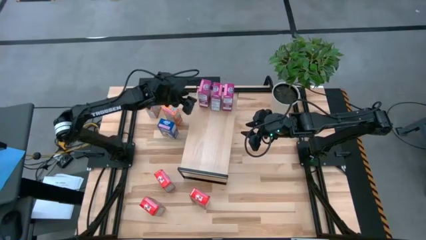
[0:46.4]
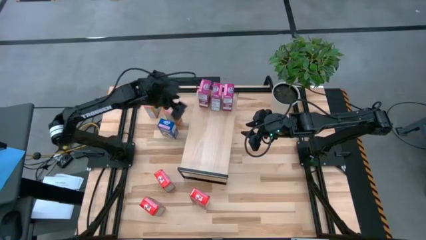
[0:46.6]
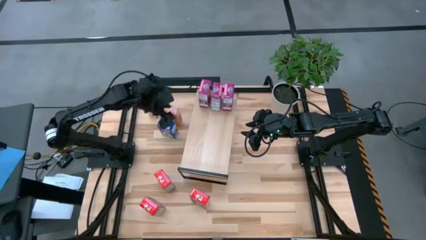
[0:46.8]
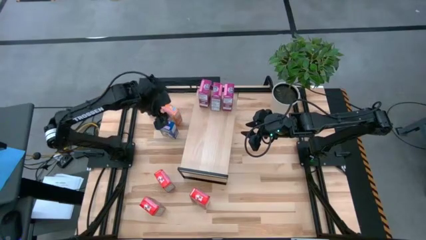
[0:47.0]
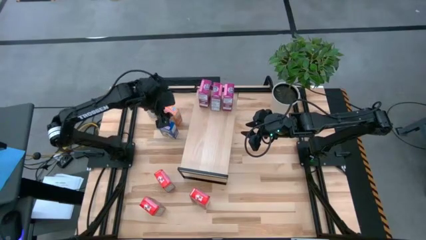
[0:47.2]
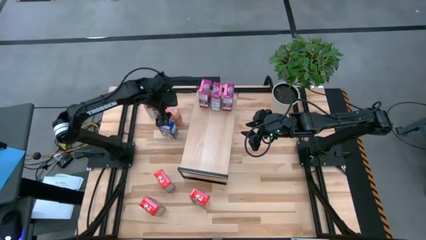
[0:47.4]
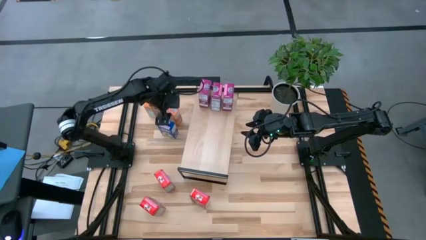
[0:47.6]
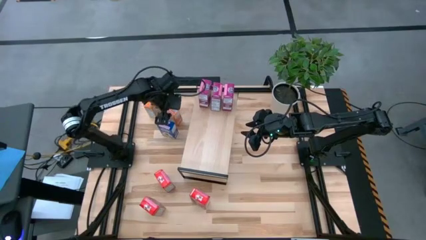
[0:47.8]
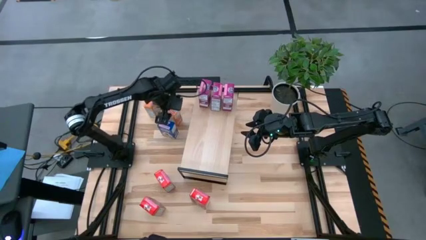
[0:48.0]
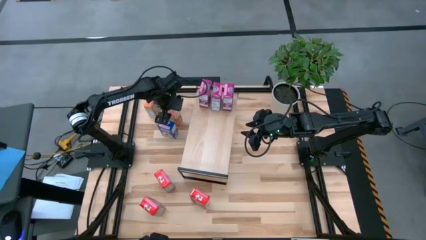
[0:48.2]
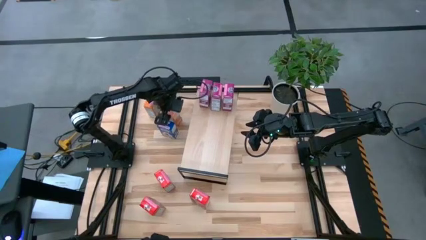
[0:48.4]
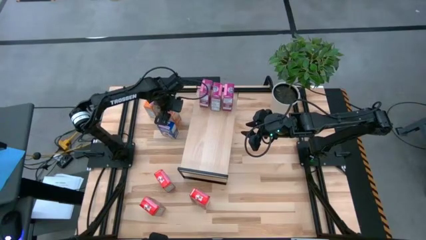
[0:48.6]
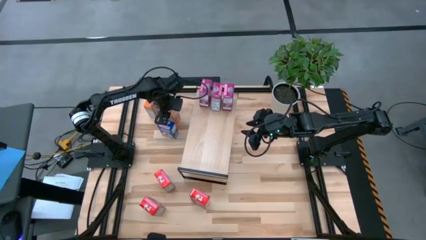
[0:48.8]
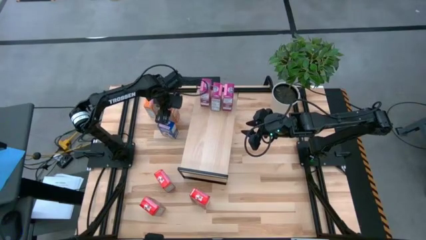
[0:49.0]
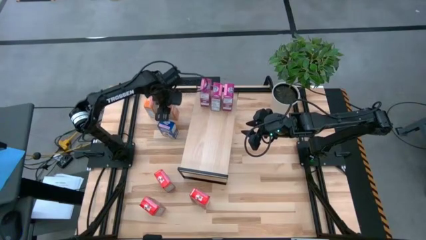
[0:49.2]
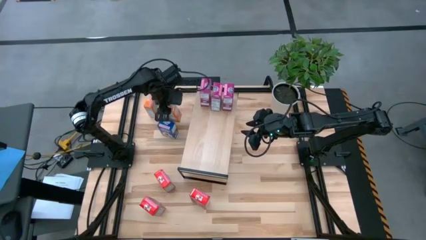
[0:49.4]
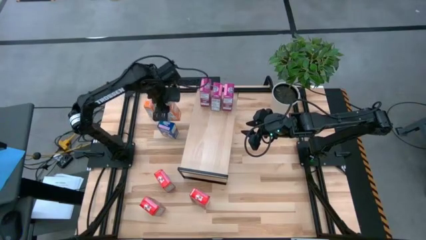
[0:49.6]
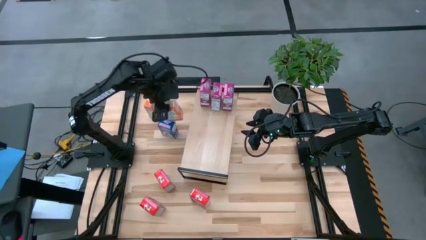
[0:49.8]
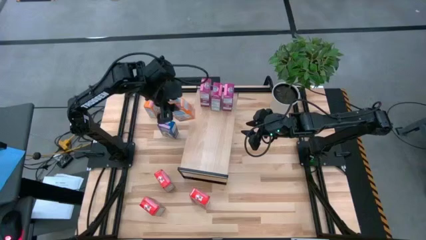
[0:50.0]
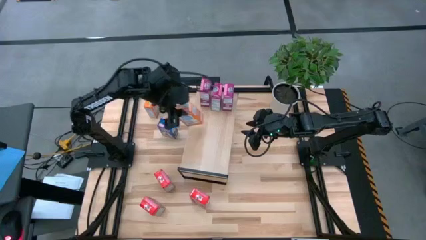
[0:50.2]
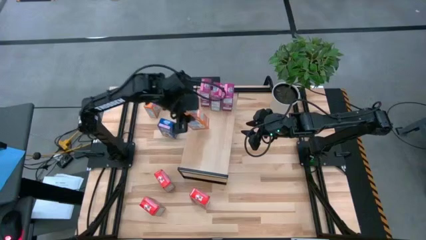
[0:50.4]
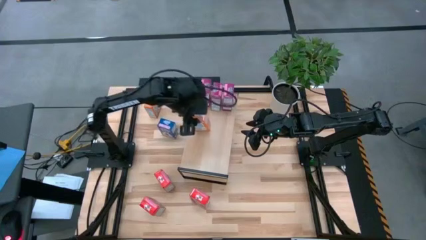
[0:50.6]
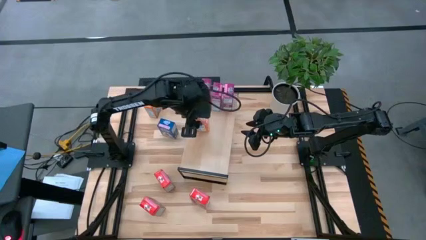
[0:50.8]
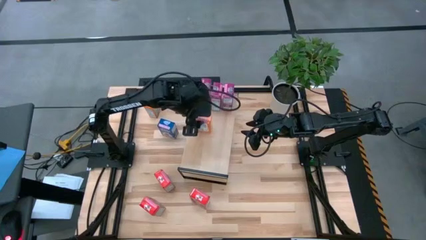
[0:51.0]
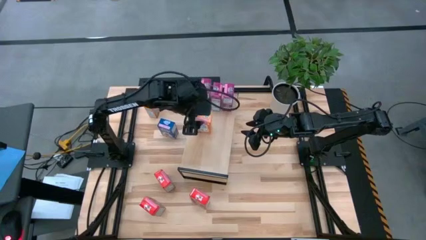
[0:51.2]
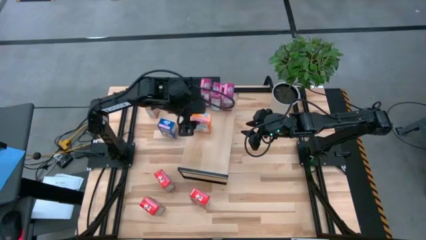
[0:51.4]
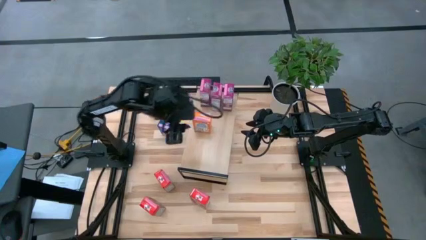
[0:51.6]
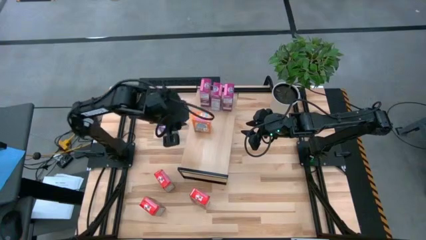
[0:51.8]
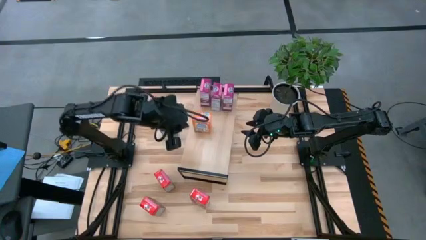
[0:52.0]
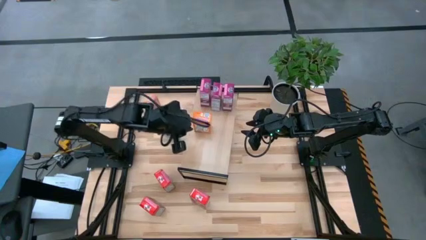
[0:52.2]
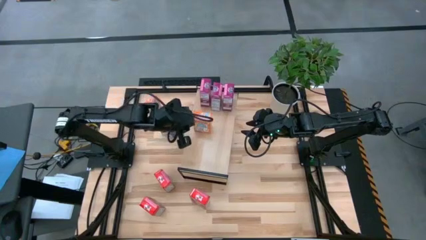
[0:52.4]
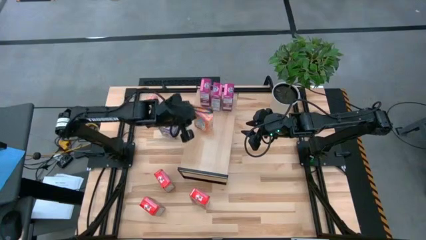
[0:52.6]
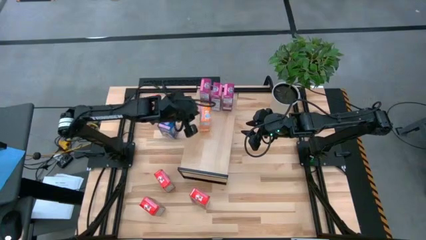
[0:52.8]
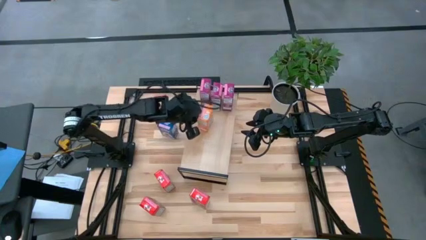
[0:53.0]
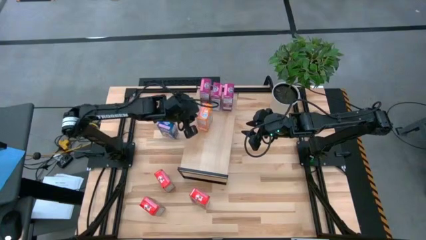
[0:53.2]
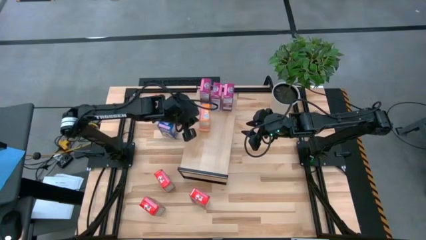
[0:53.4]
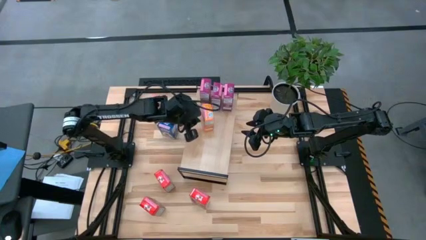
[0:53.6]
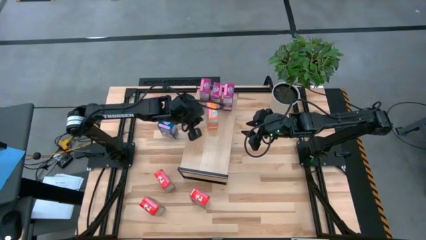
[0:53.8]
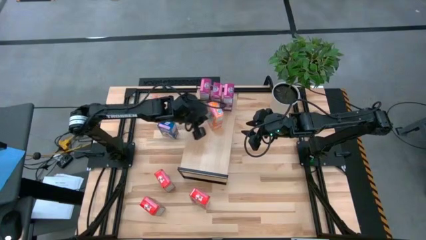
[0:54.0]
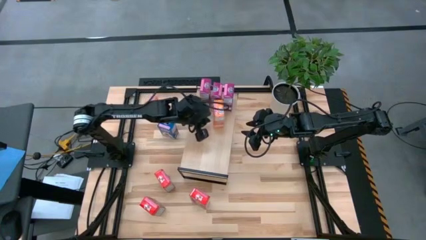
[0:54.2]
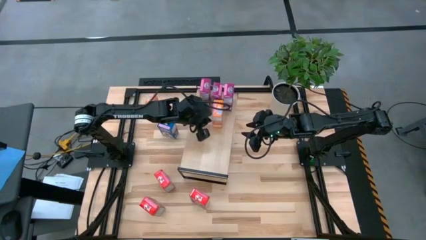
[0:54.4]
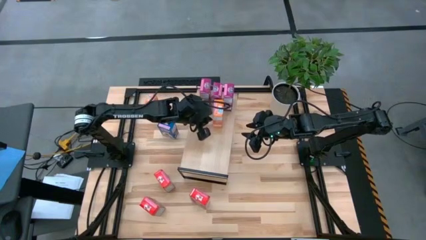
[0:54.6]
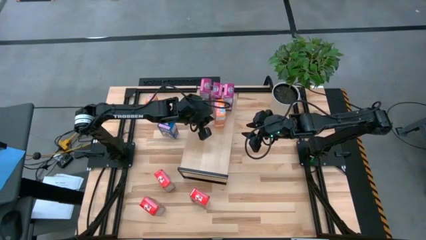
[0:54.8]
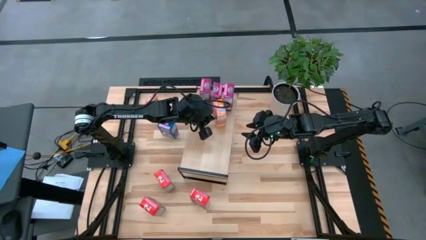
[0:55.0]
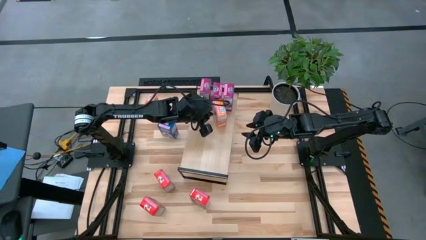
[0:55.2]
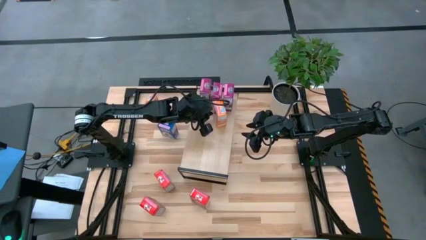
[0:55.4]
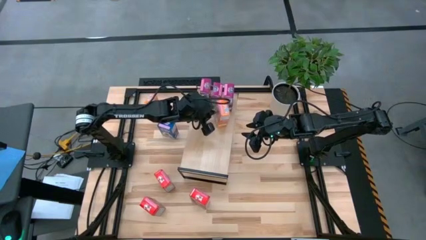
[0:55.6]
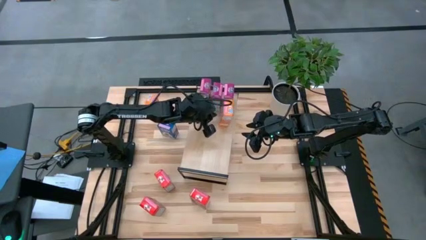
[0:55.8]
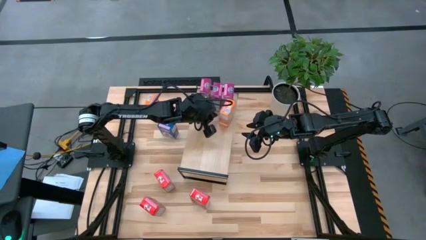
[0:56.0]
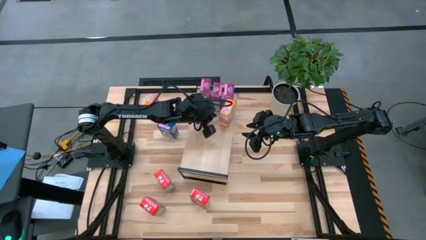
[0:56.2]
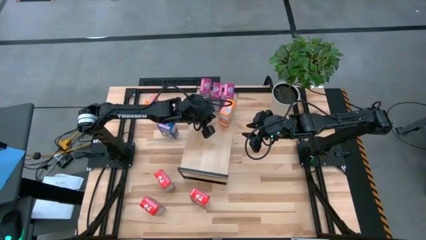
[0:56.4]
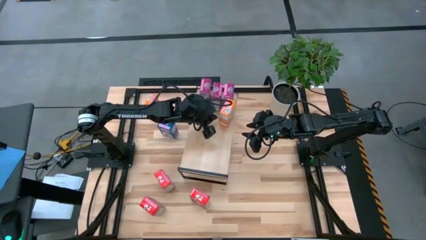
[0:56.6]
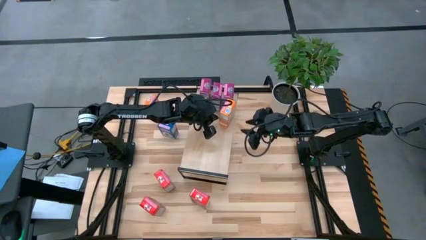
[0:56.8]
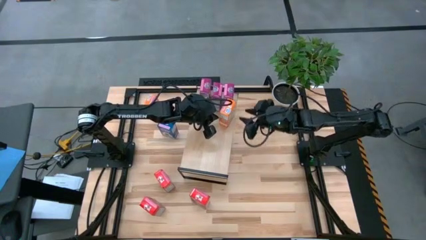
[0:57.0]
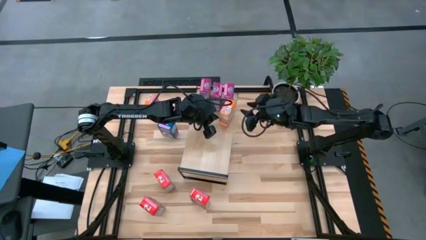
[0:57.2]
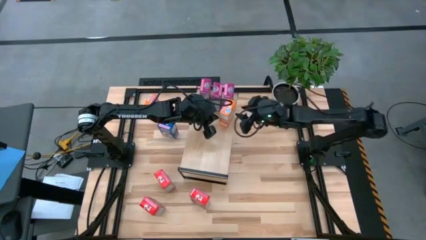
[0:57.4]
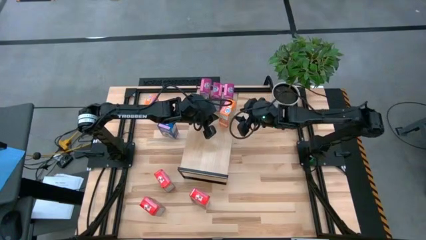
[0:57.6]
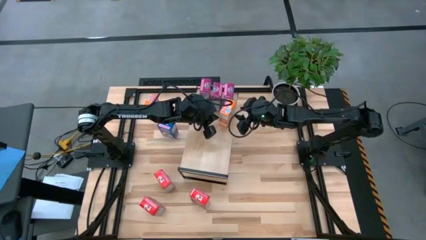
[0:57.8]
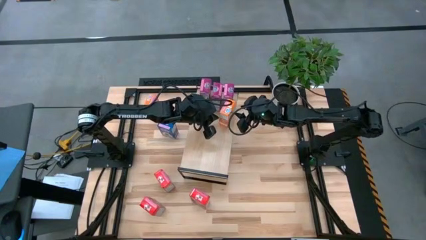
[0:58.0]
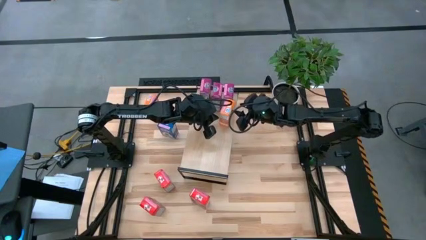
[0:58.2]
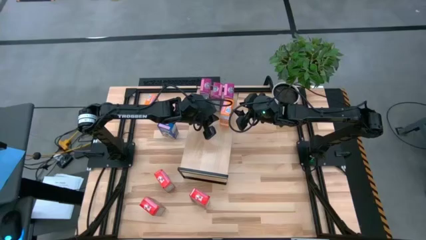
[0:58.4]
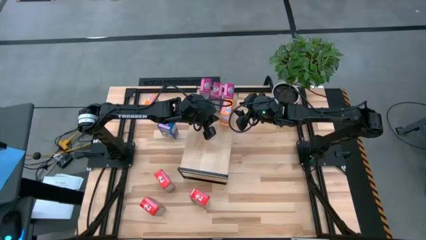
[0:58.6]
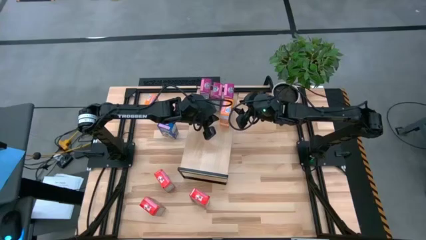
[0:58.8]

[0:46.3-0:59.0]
Task: Stack cereal on shelf
Put the right orange cereal box on the shelf
